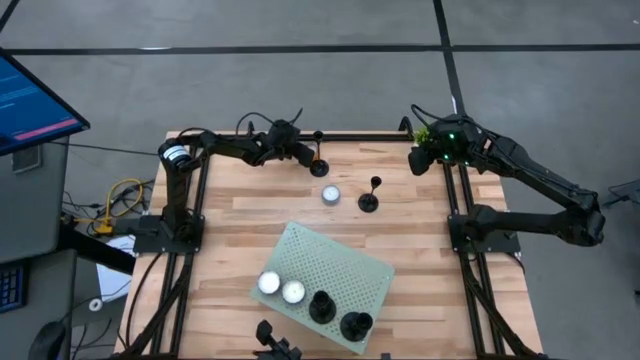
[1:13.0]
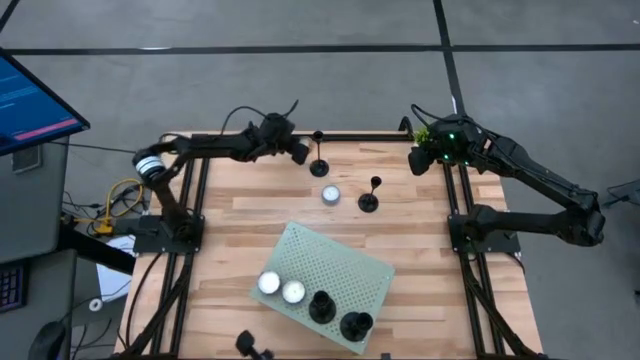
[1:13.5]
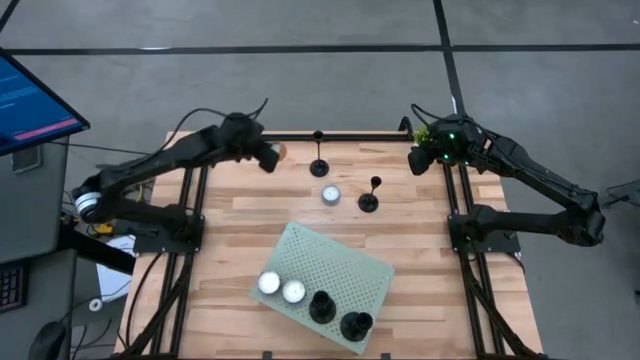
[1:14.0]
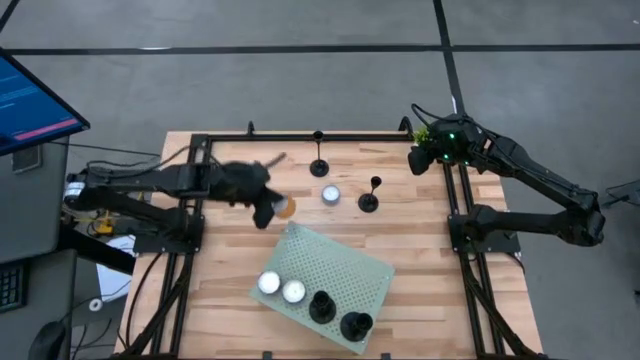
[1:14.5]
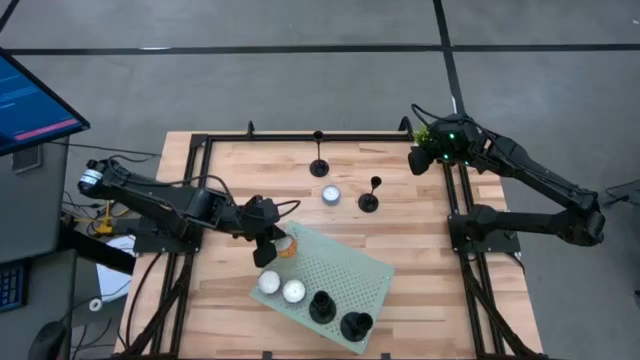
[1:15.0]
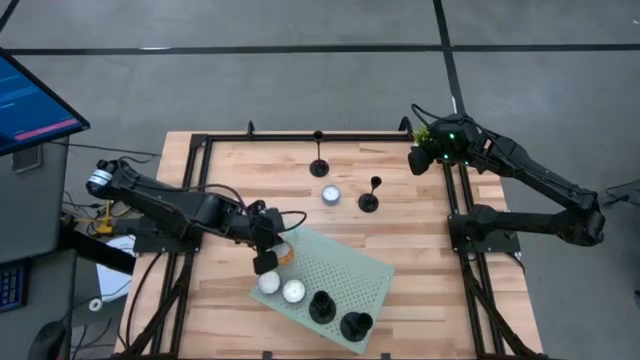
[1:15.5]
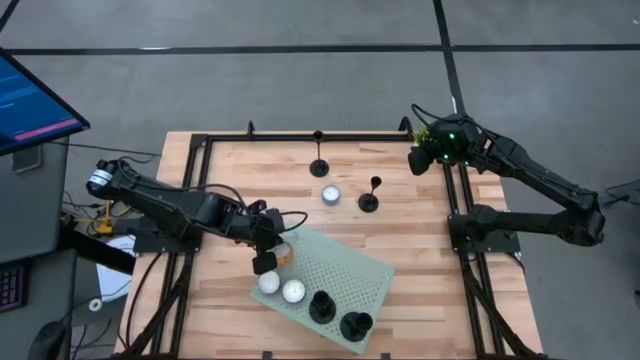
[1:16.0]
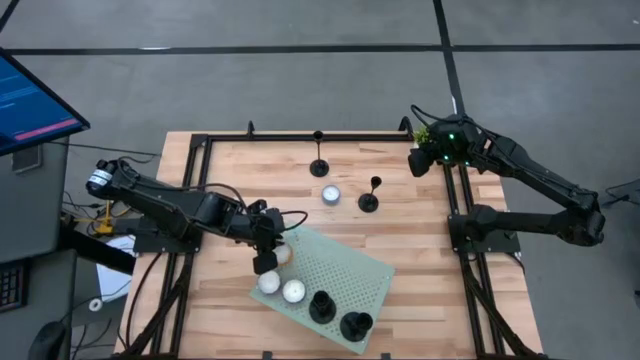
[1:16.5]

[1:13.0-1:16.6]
Task: Pick & Place candle stick holders
Put the yellow patterned scented candle on the shelf aligned with the other red patterned scented candle

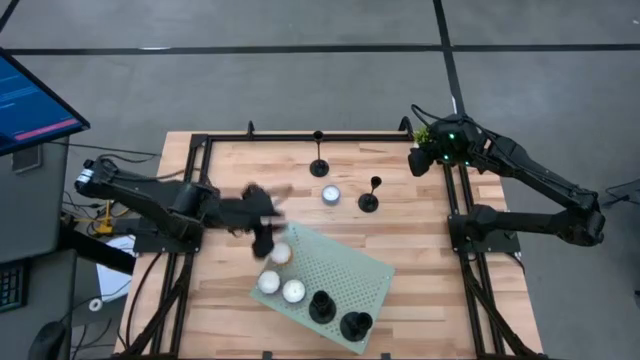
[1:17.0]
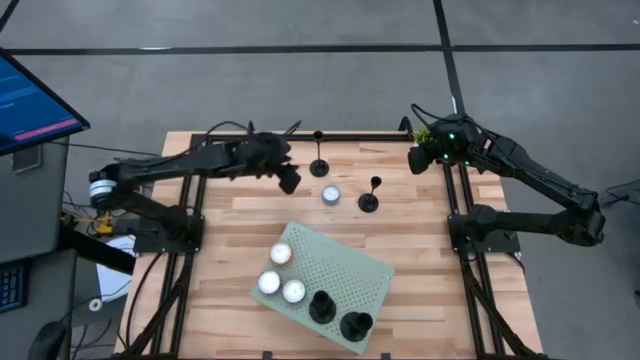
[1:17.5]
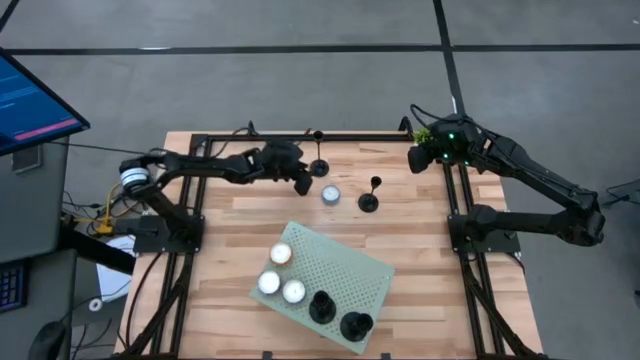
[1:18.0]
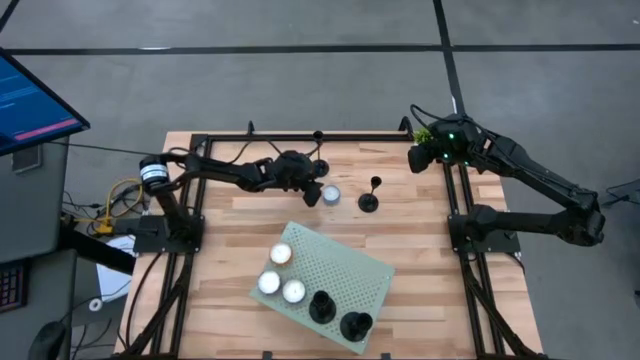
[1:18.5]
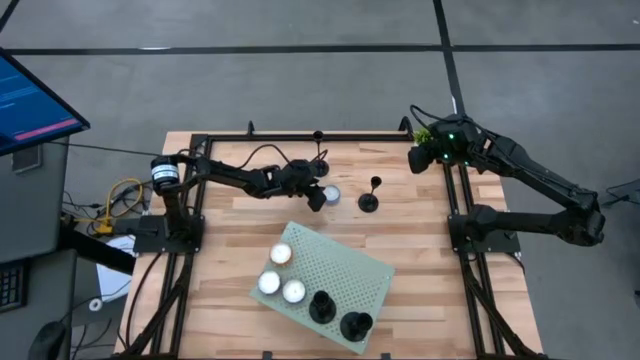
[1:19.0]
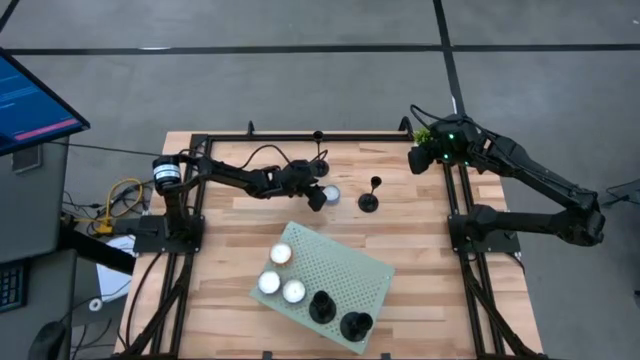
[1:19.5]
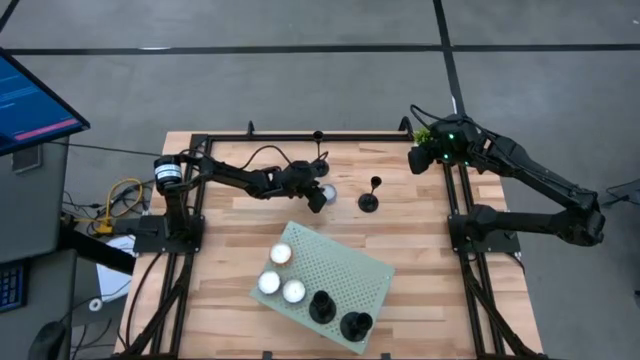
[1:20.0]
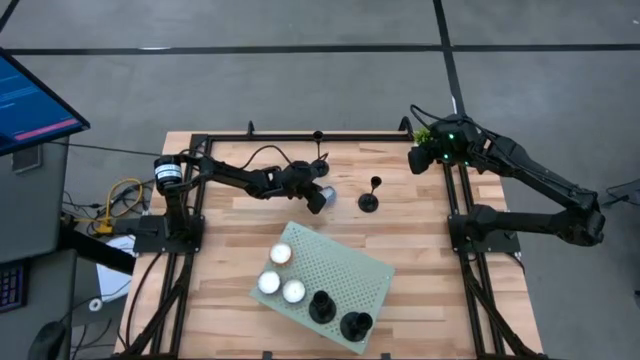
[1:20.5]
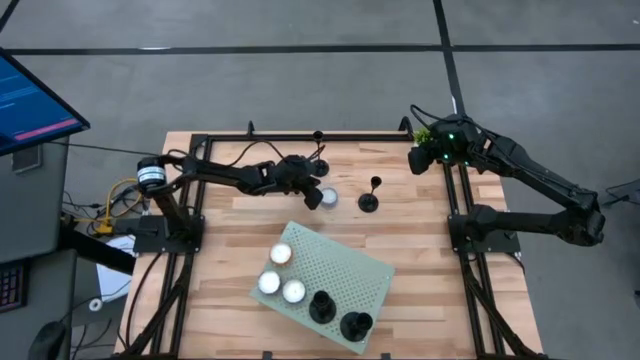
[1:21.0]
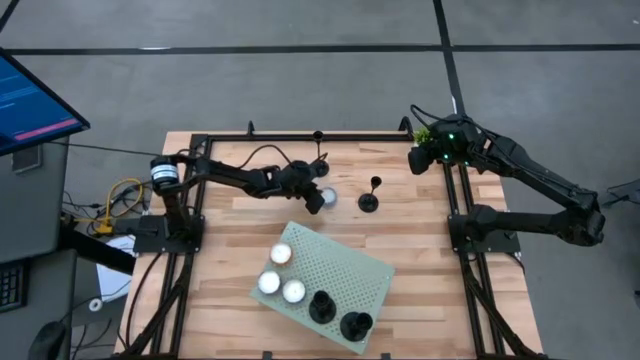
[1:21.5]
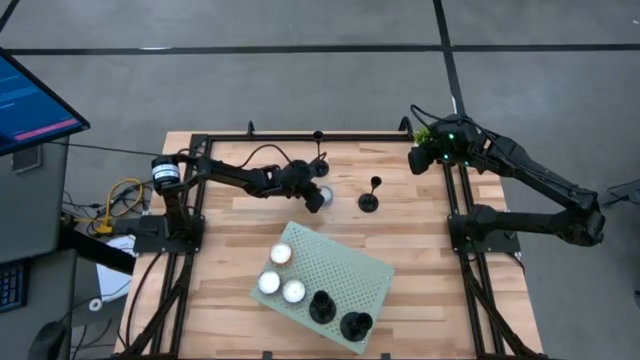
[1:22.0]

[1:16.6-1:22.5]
Put the blue patterned scented candle on the shelf aligned with the other blue patterned scented candle

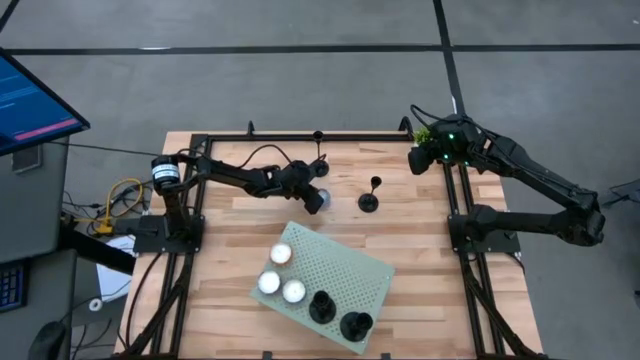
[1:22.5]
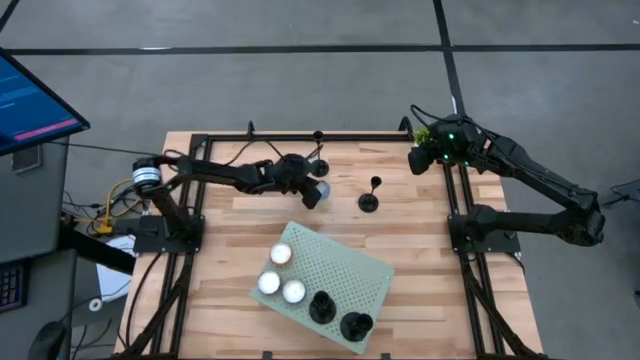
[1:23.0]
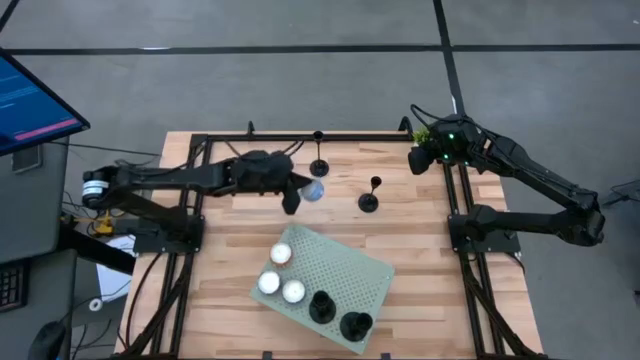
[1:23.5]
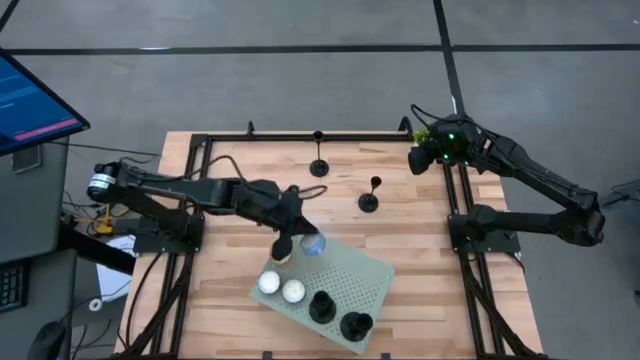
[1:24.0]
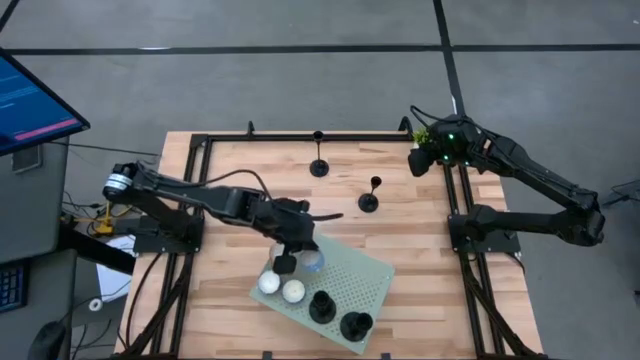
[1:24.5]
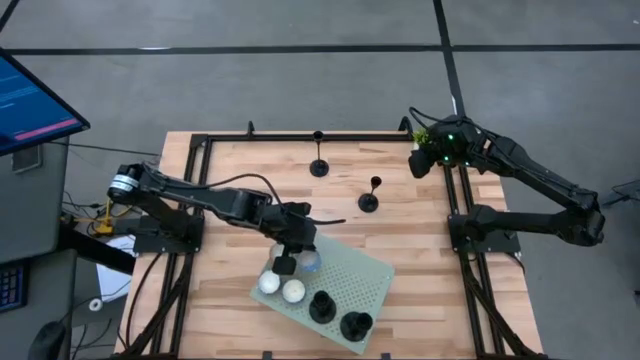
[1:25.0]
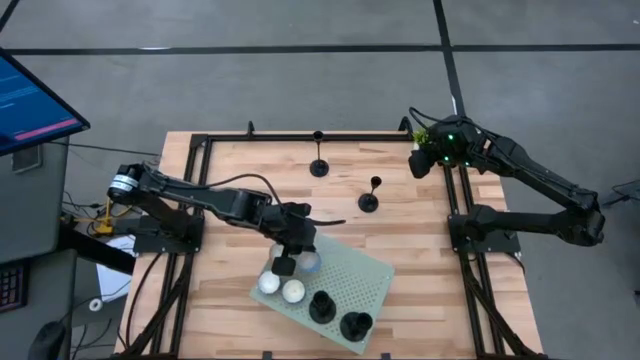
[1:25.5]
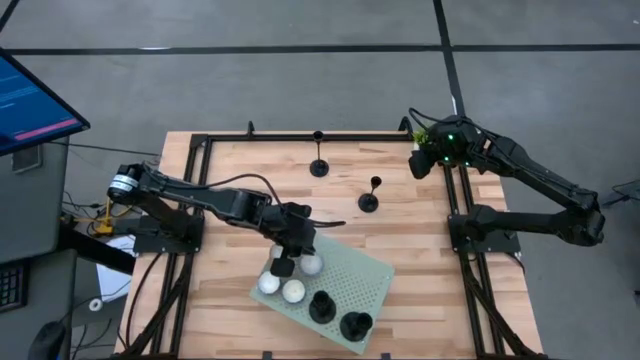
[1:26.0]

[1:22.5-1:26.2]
Put the blue patterned scented candle on the shelf aligned with the other blue patterned scented candle

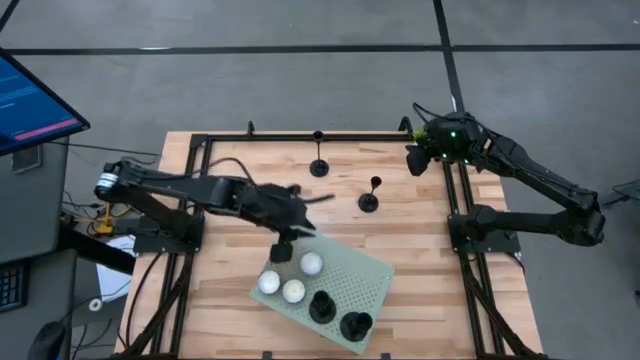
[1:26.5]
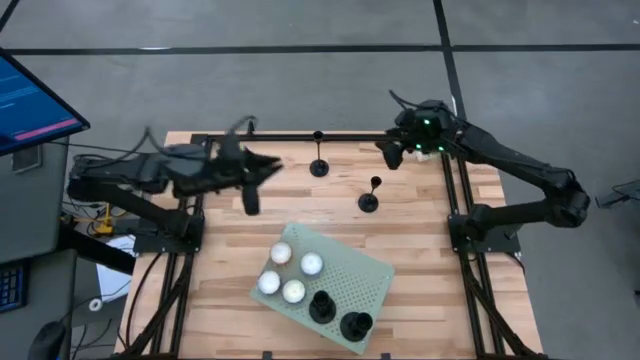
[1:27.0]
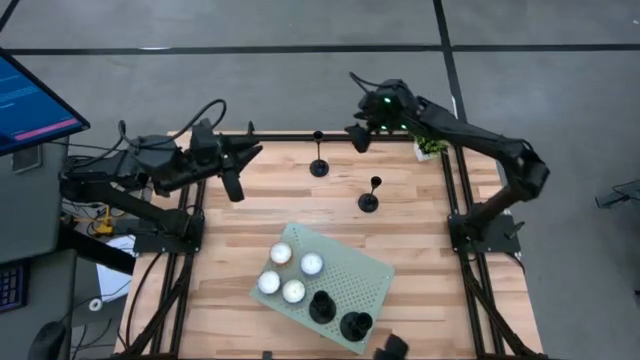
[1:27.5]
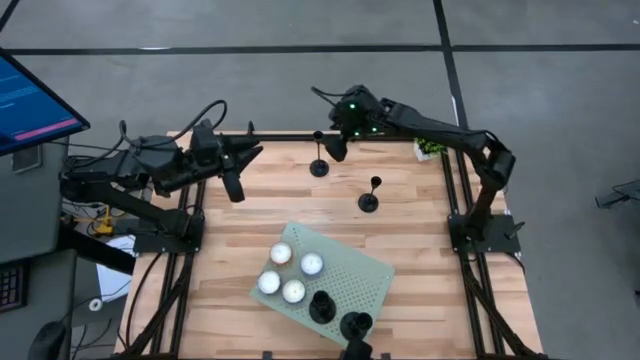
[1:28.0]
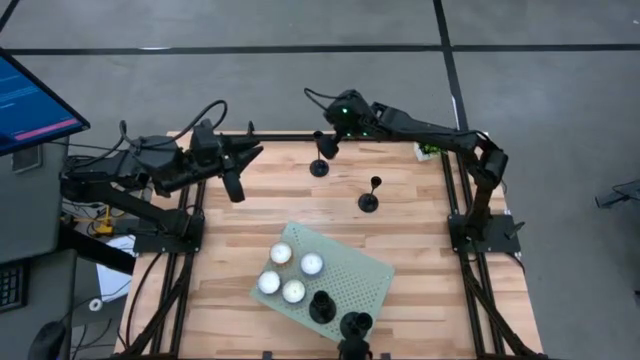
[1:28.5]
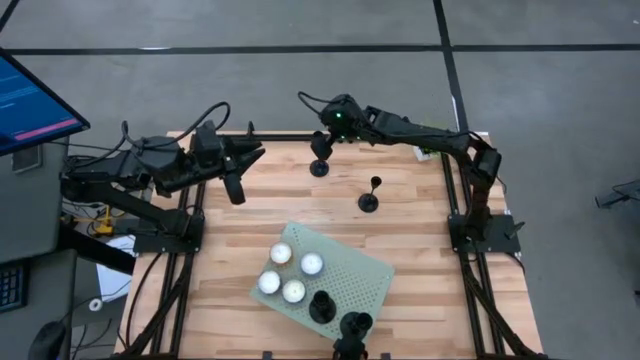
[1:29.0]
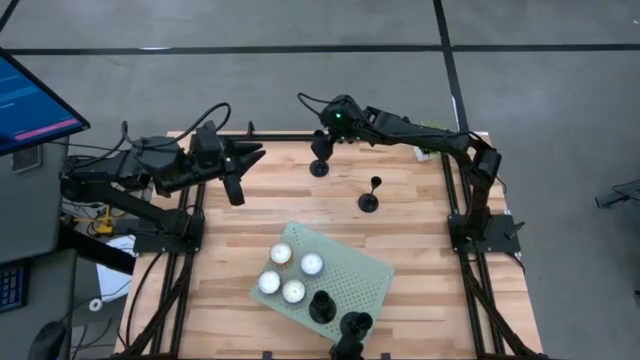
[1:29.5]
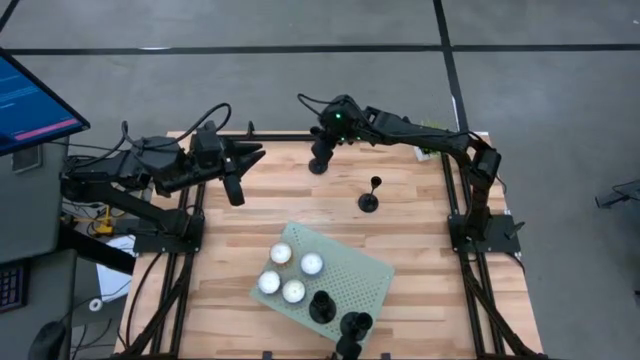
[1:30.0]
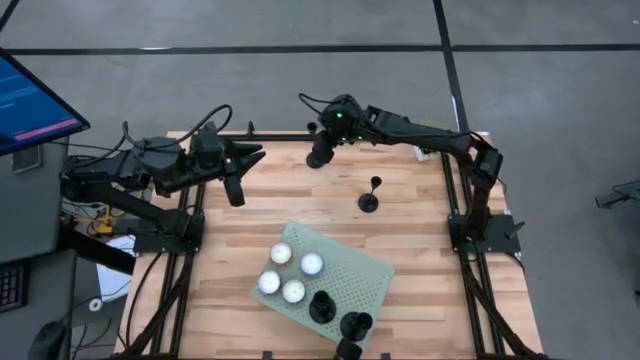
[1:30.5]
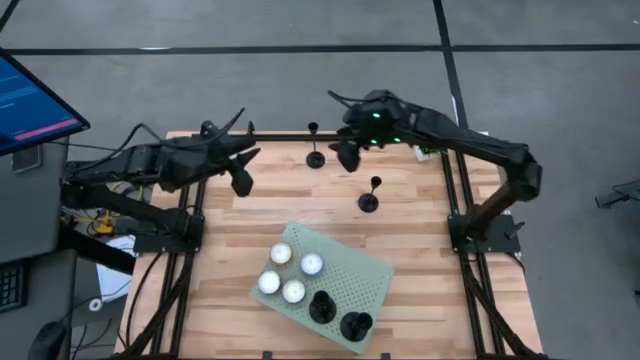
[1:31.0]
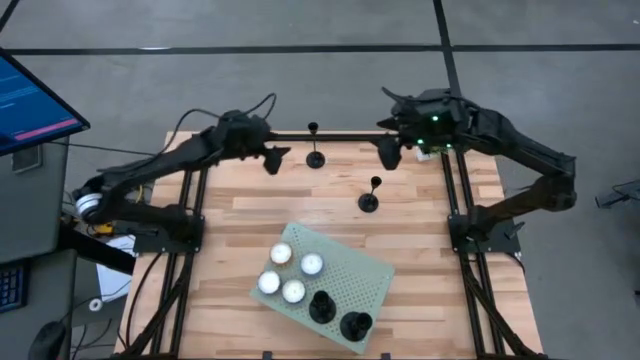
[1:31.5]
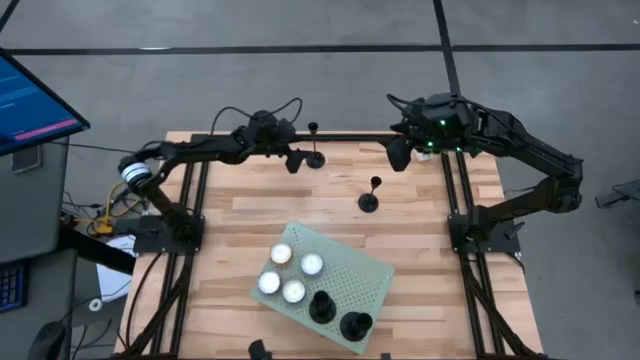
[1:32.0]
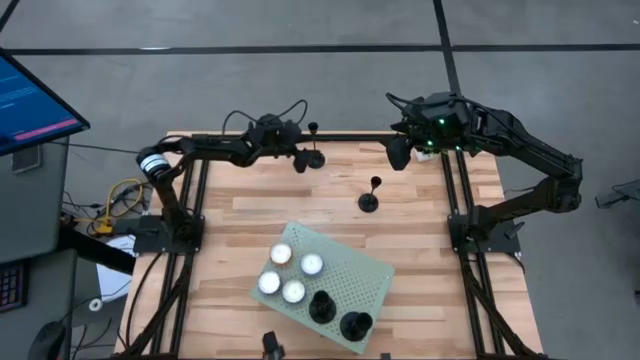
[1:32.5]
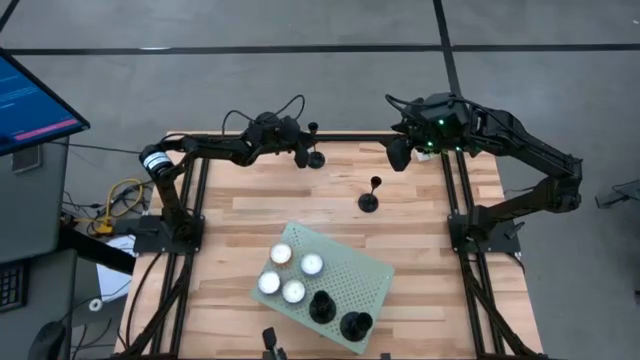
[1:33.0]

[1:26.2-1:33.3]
Put the candle holder on the shelf
